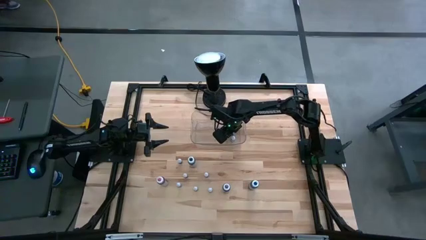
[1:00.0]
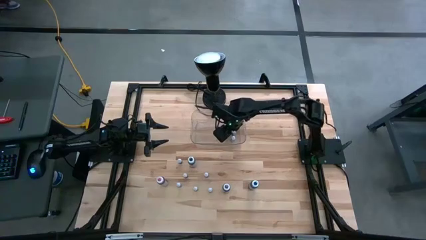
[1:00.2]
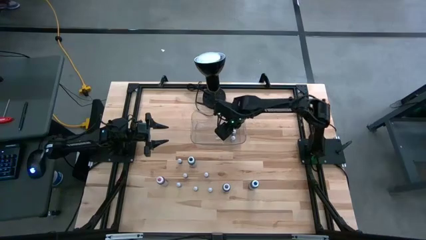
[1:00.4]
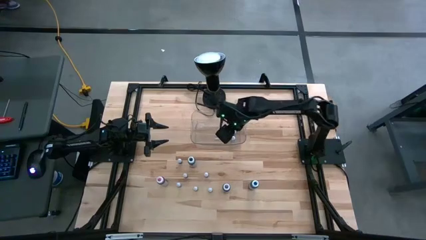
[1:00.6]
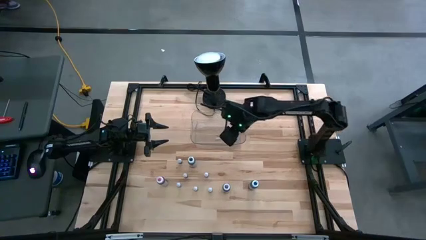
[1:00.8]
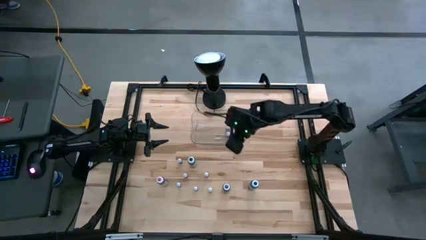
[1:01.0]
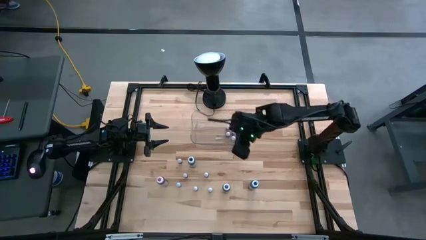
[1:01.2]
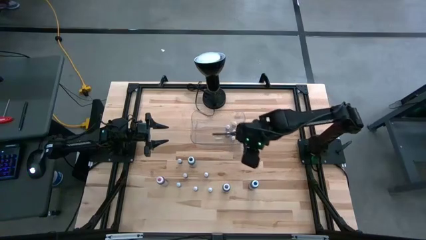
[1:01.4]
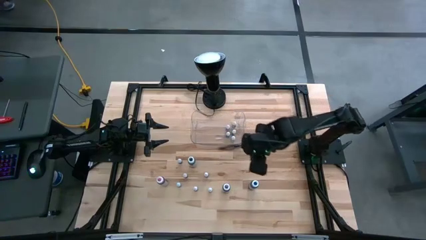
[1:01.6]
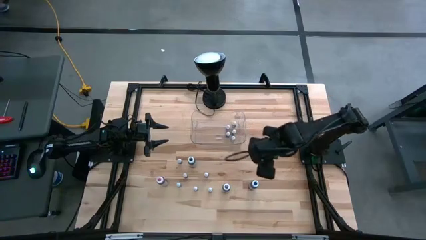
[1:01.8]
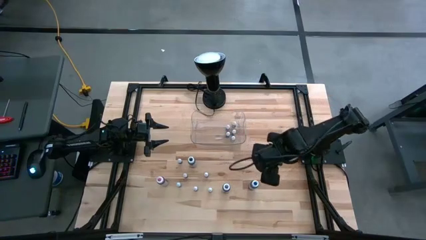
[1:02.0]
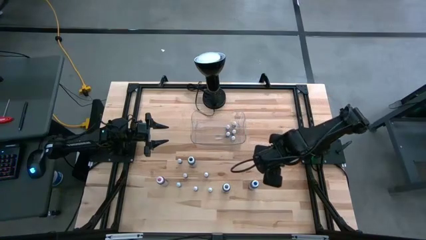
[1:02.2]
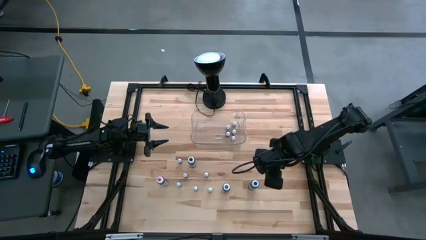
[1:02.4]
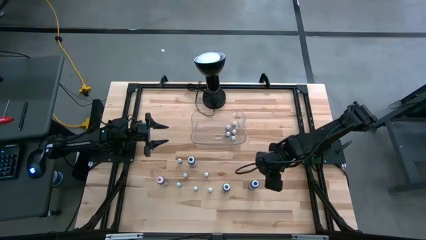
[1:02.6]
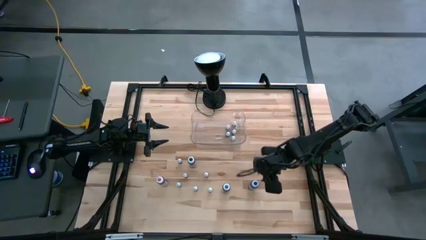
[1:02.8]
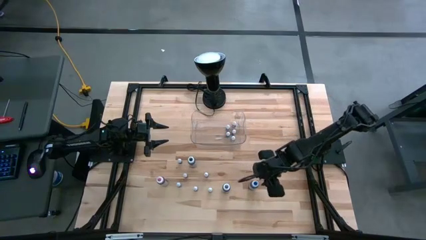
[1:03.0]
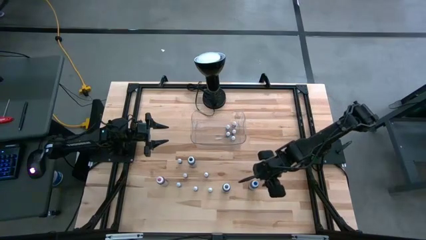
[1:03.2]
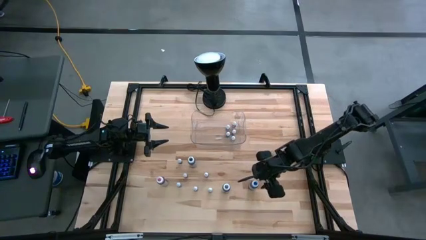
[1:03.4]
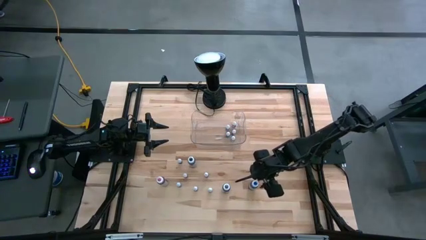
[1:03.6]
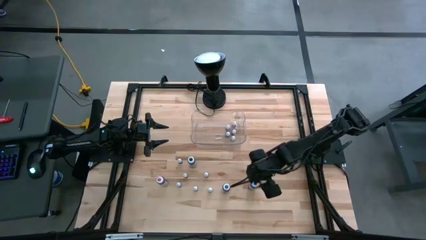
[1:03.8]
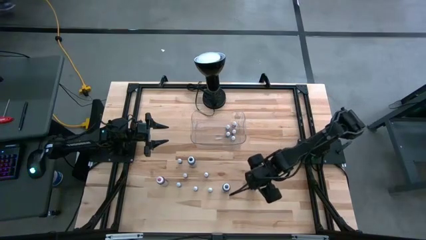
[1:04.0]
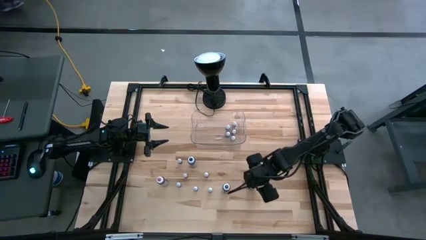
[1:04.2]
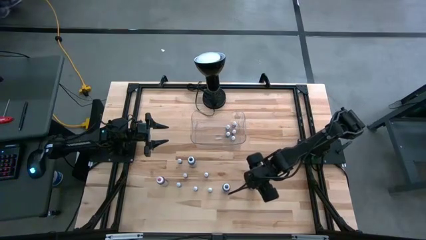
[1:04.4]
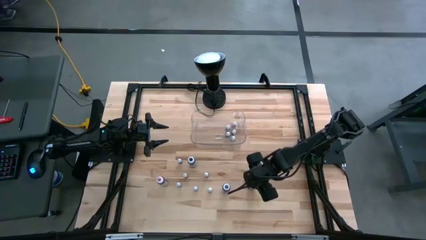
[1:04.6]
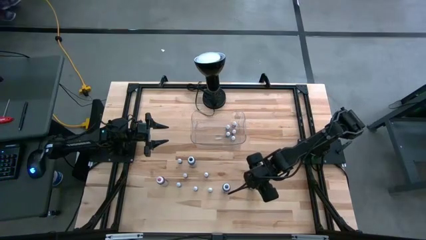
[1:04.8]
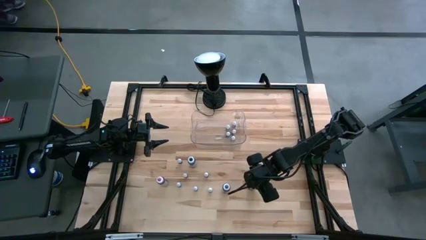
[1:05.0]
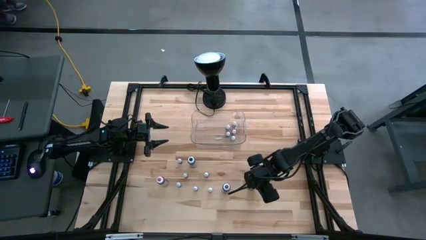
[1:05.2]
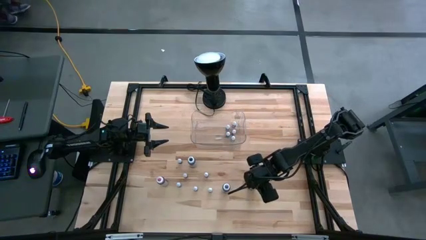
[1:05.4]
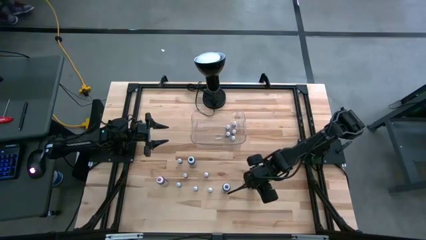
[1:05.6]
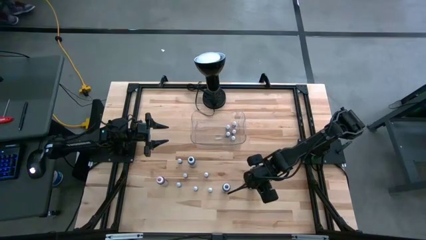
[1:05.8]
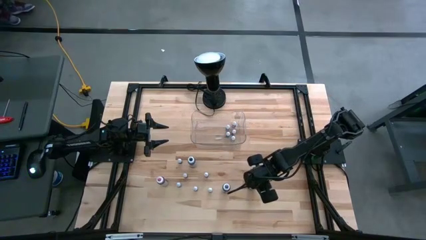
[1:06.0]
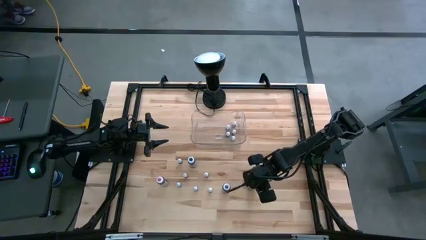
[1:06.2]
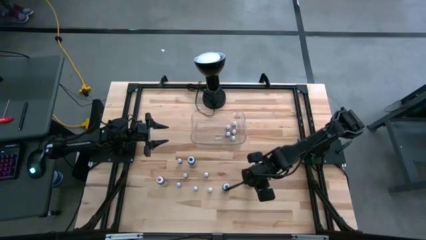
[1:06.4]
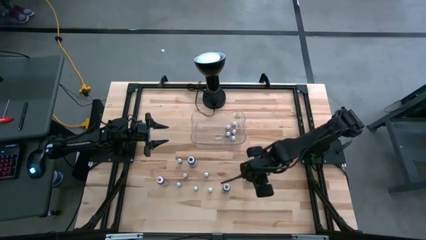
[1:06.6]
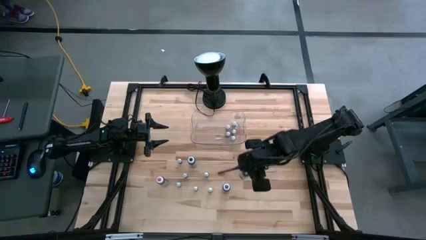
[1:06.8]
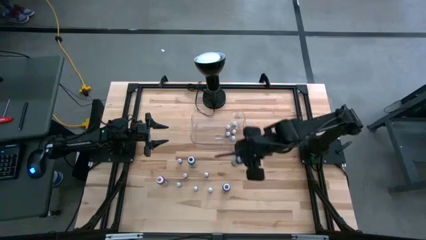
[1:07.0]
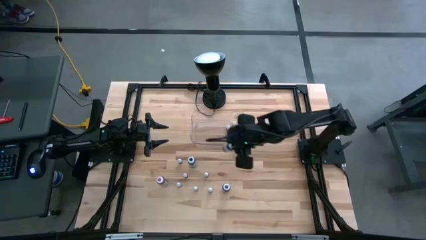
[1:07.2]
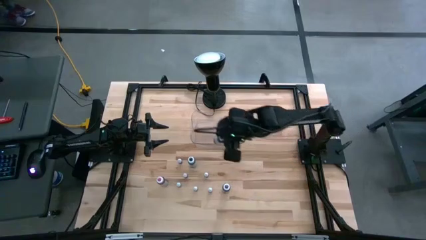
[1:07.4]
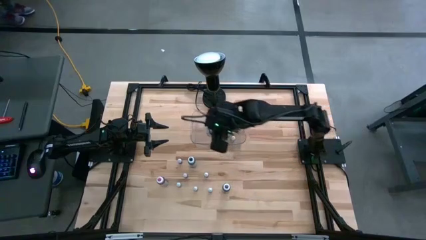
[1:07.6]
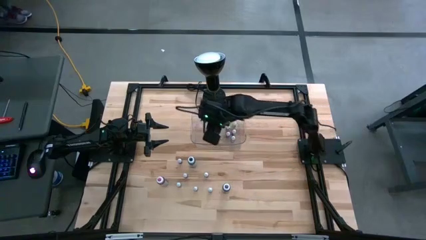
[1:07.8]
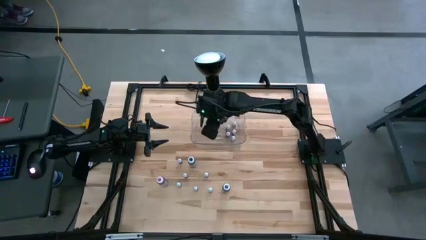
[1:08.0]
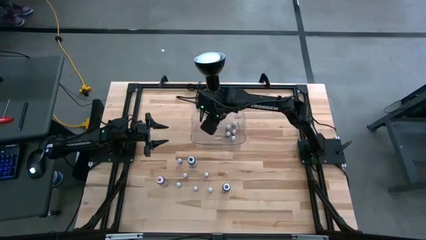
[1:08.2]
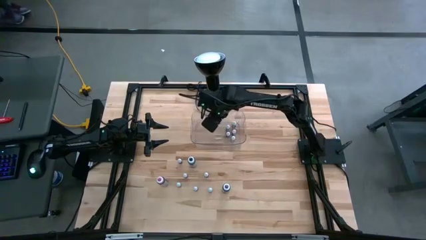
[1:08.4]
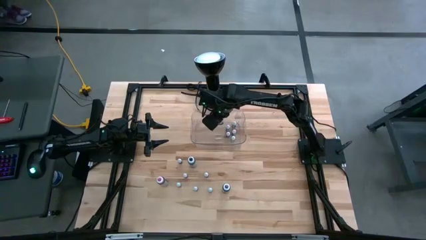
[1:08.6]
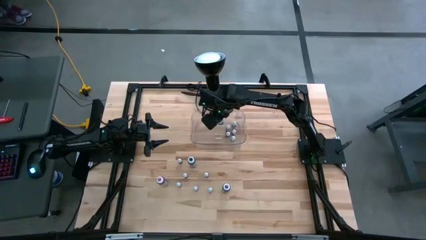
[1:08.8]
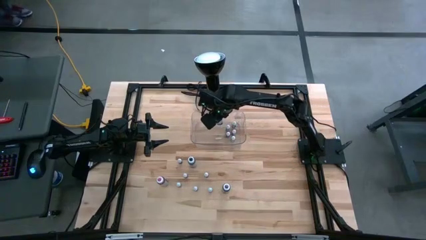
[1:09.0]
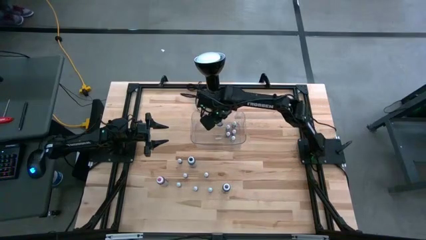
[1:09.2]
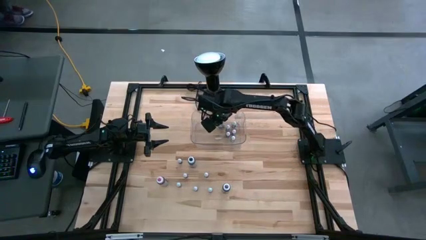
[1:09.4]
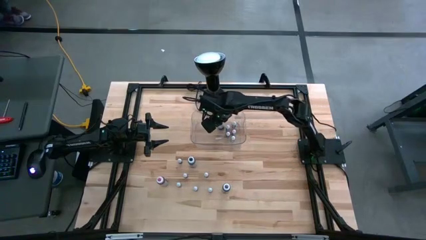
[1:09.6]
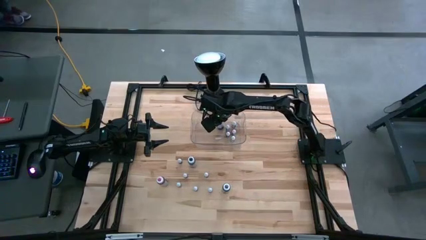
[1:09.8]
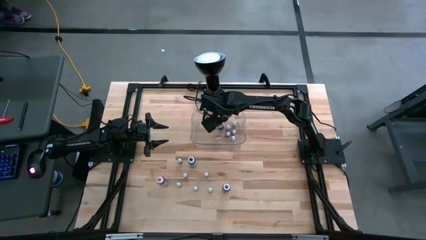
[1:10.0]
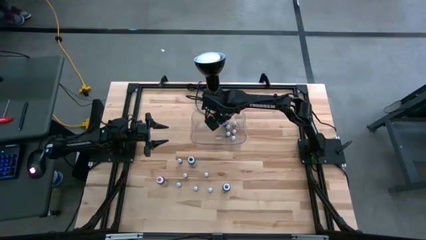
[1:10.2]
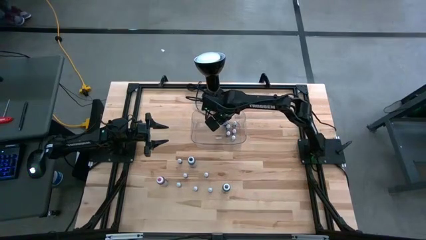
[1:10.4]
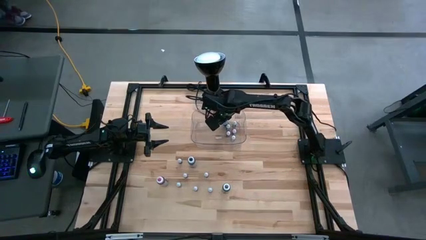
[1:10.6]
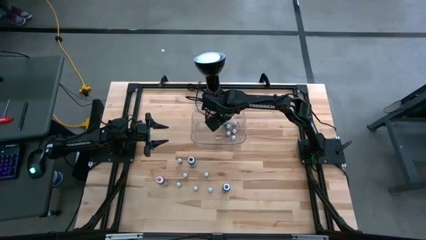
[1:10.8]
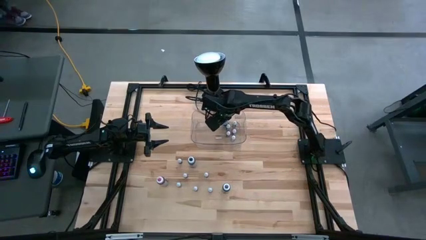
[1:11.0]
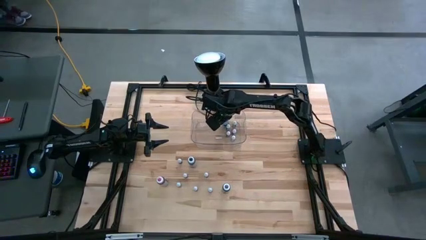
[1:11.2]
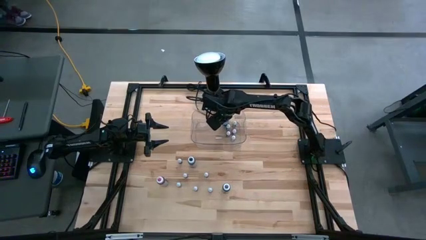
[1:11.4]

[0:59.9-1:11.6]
Task: Pick & Place food coloring
Put the large blue food coloring bottle into the transparent bin
